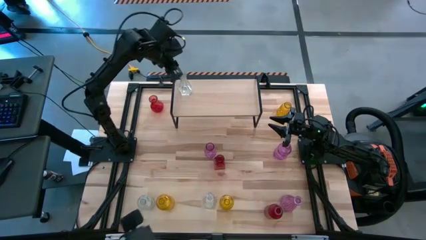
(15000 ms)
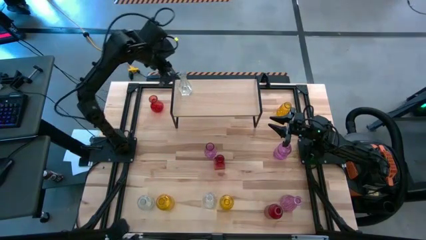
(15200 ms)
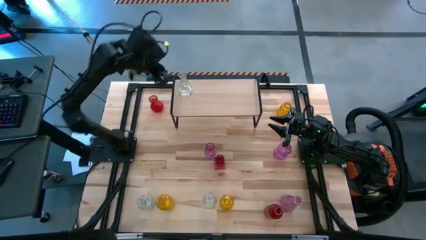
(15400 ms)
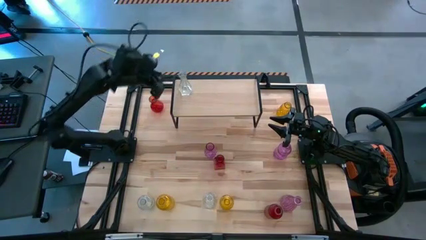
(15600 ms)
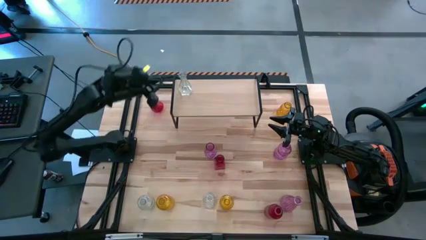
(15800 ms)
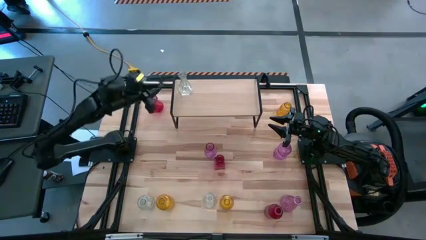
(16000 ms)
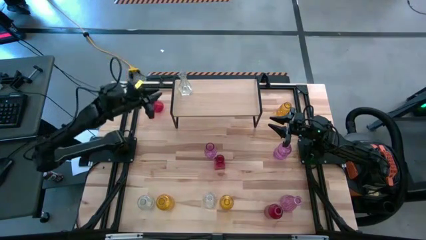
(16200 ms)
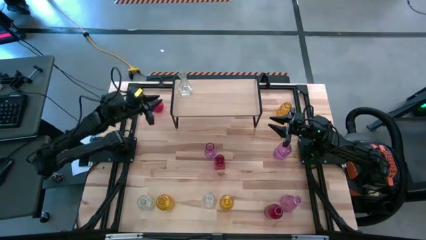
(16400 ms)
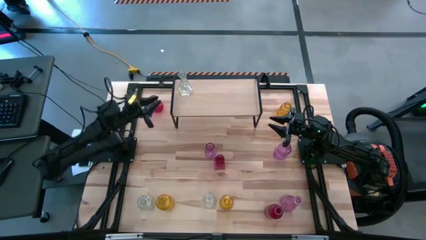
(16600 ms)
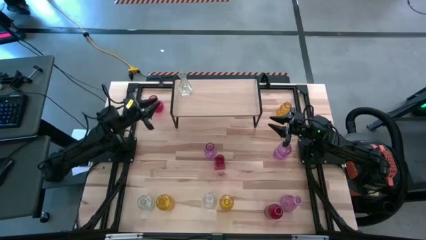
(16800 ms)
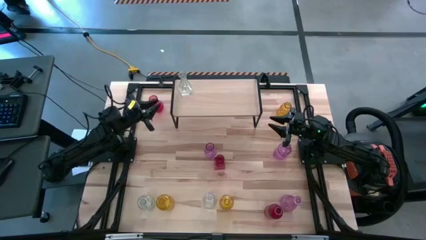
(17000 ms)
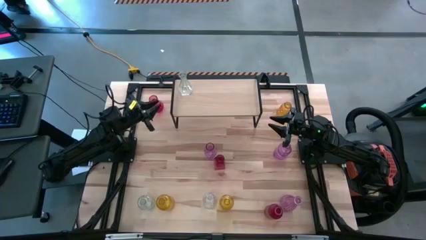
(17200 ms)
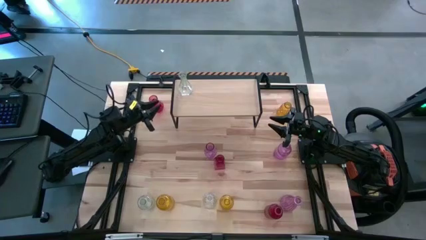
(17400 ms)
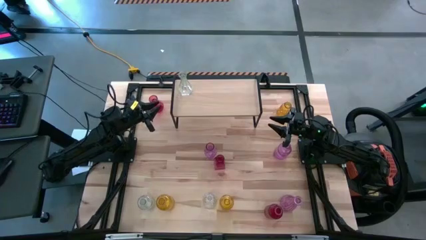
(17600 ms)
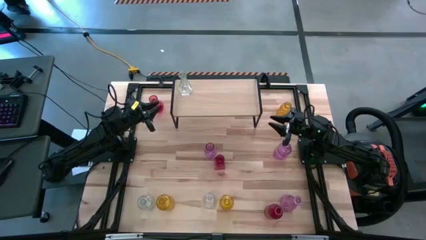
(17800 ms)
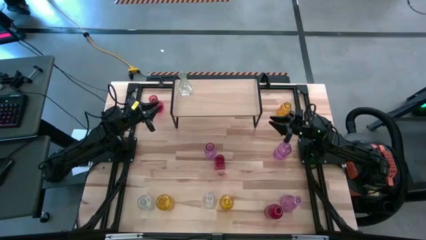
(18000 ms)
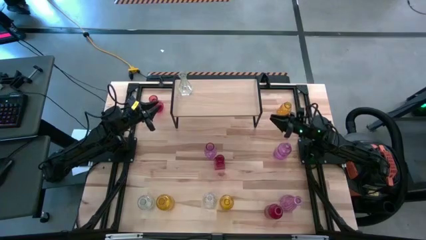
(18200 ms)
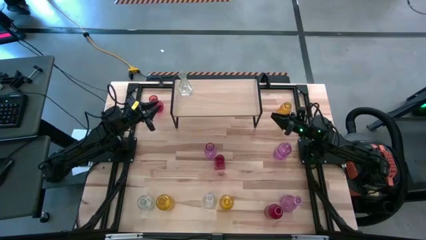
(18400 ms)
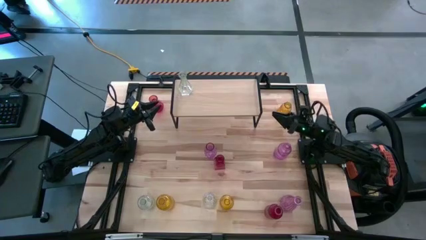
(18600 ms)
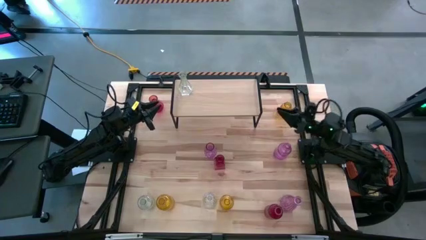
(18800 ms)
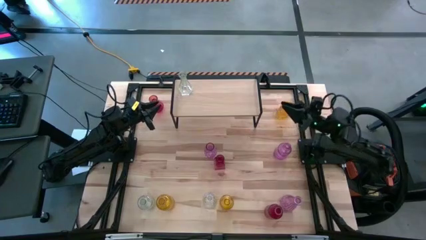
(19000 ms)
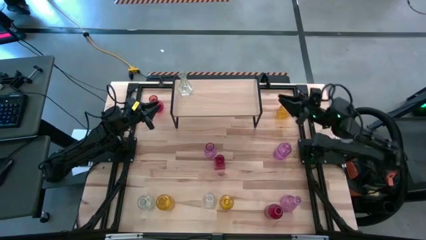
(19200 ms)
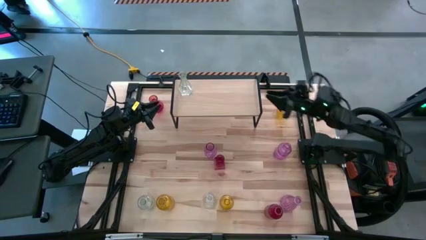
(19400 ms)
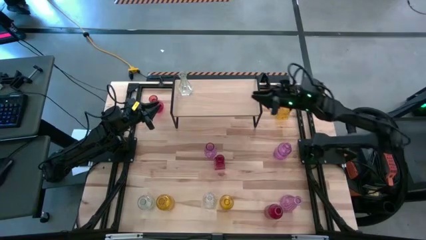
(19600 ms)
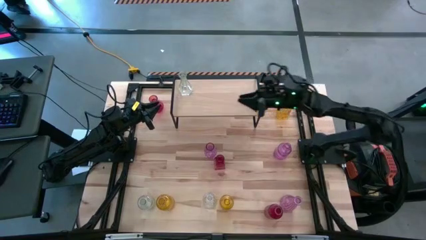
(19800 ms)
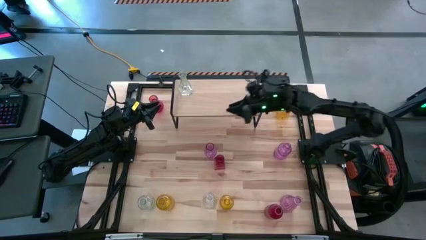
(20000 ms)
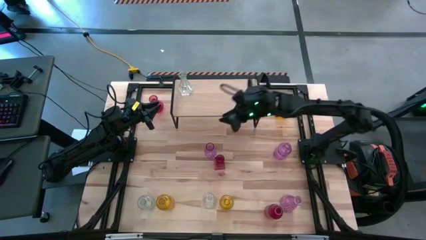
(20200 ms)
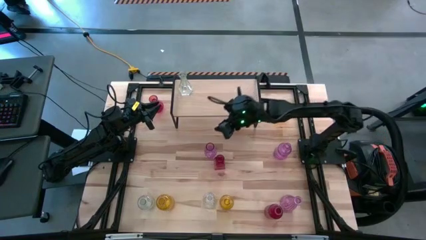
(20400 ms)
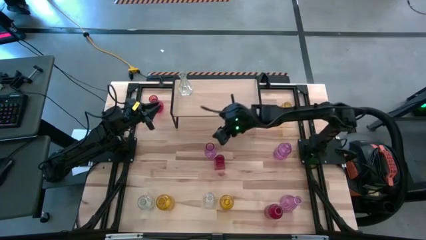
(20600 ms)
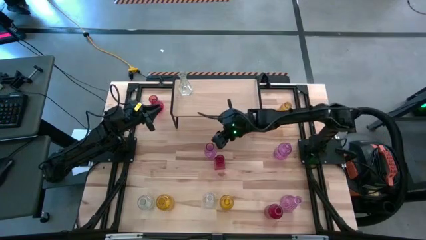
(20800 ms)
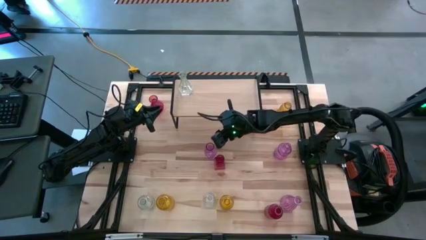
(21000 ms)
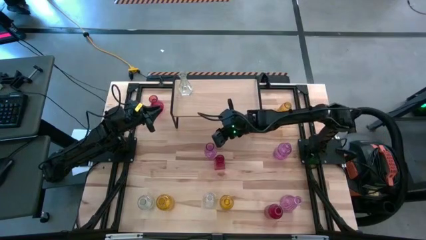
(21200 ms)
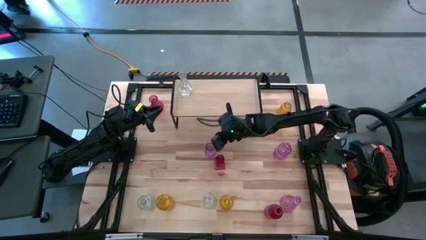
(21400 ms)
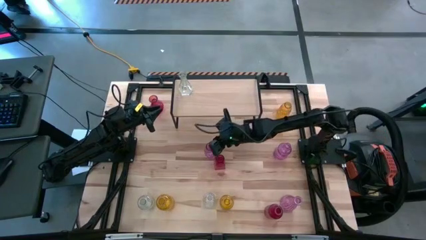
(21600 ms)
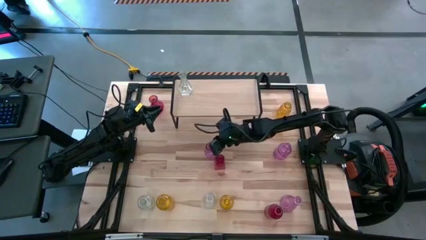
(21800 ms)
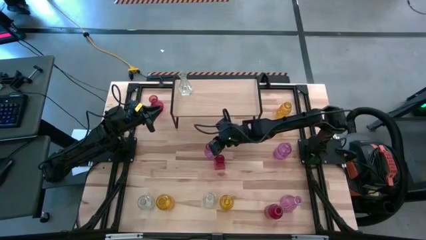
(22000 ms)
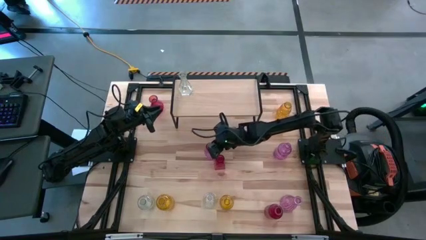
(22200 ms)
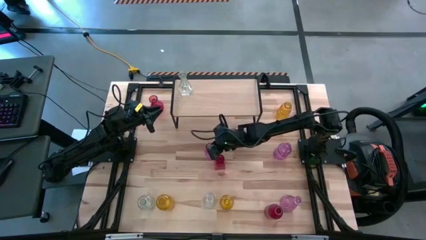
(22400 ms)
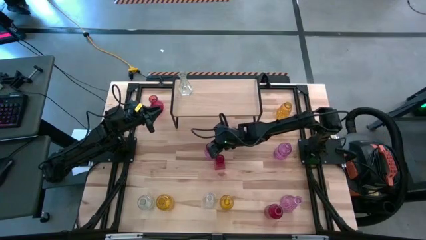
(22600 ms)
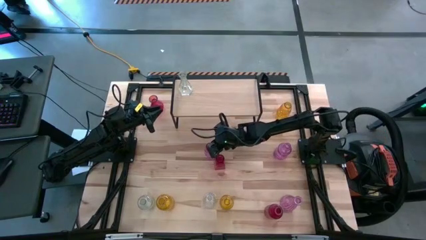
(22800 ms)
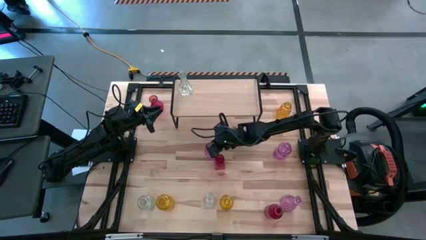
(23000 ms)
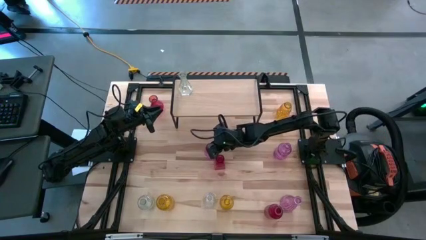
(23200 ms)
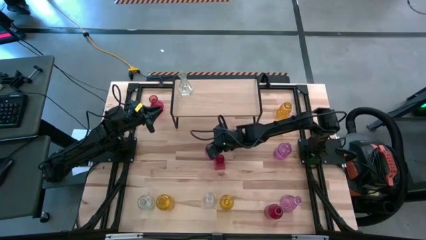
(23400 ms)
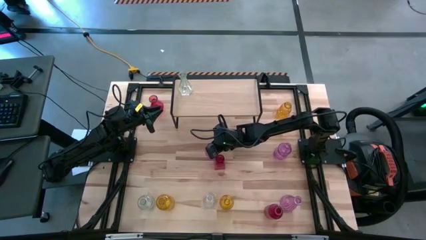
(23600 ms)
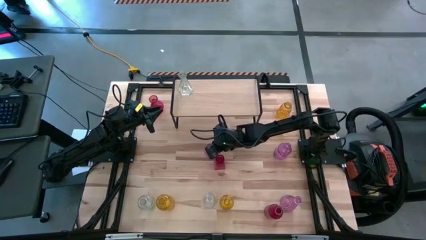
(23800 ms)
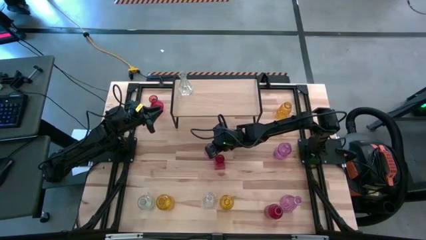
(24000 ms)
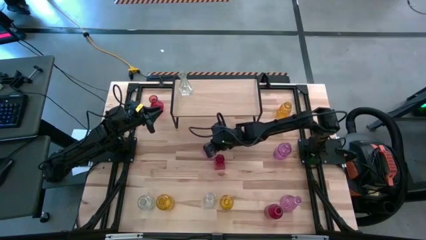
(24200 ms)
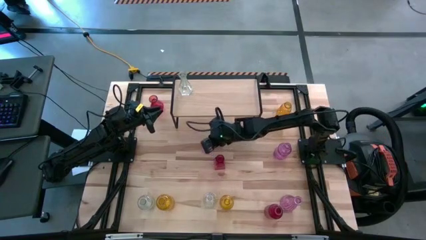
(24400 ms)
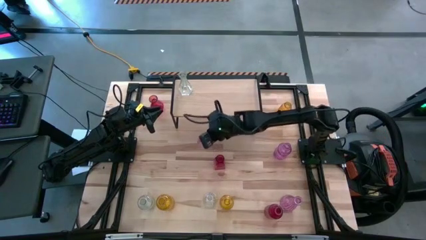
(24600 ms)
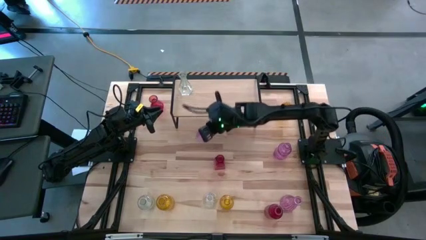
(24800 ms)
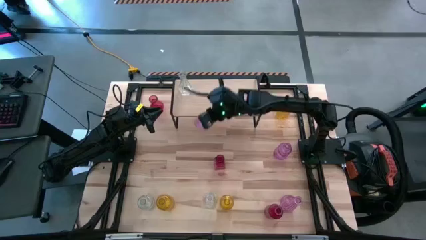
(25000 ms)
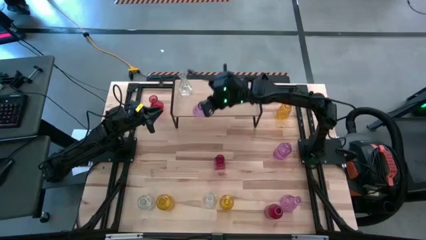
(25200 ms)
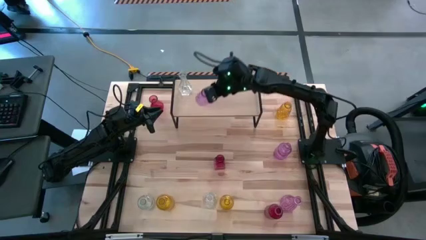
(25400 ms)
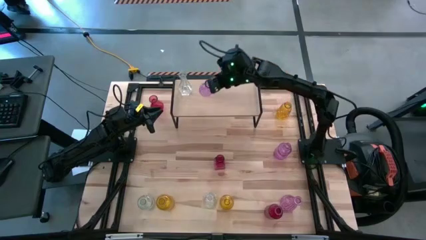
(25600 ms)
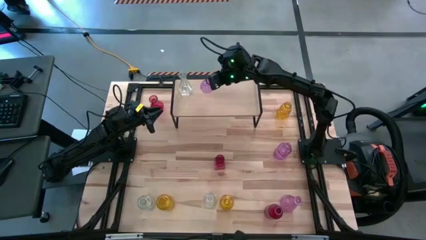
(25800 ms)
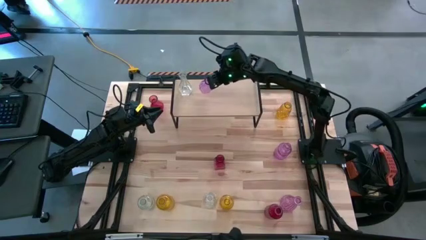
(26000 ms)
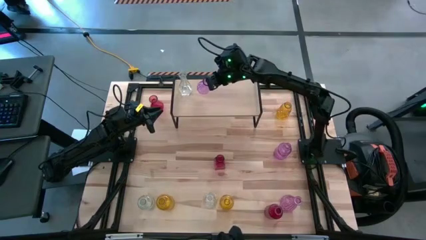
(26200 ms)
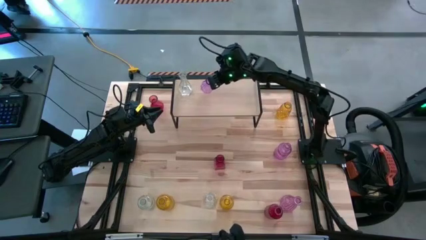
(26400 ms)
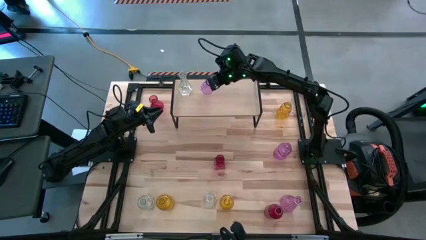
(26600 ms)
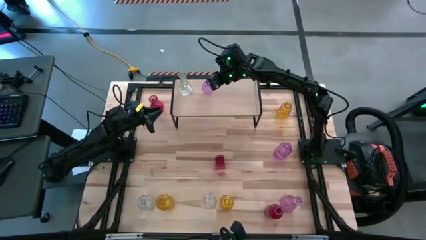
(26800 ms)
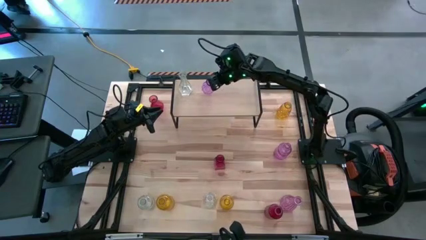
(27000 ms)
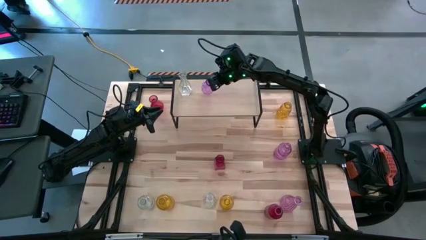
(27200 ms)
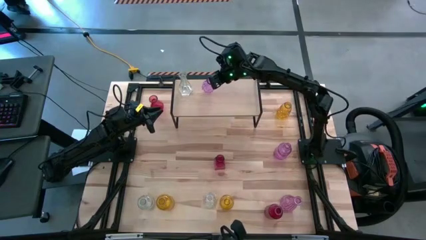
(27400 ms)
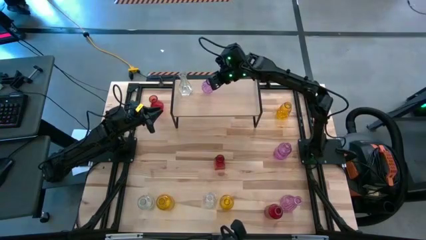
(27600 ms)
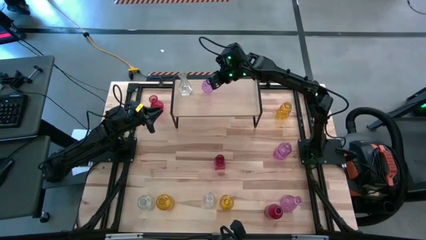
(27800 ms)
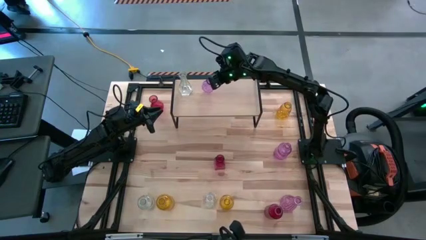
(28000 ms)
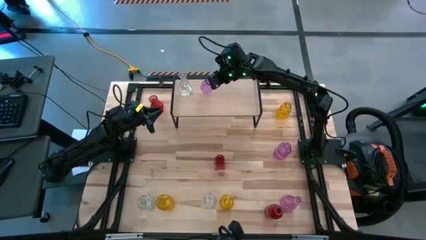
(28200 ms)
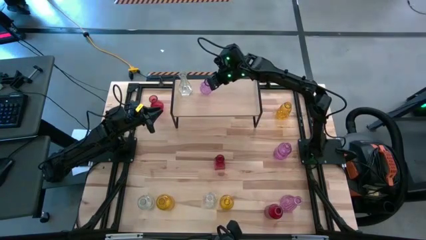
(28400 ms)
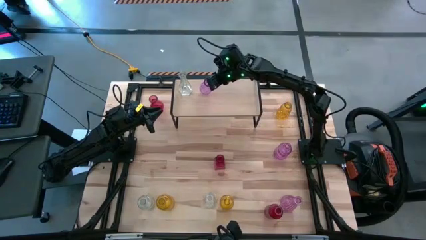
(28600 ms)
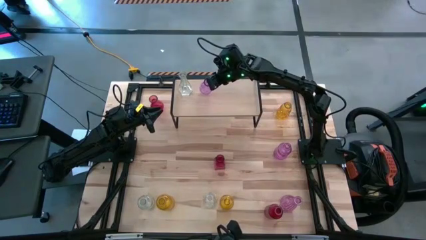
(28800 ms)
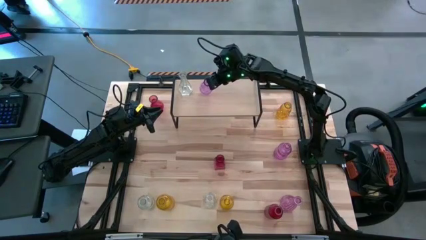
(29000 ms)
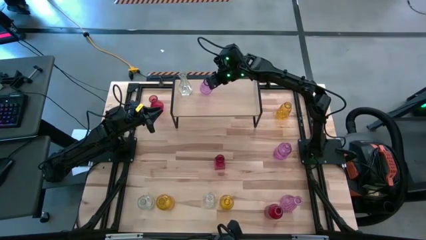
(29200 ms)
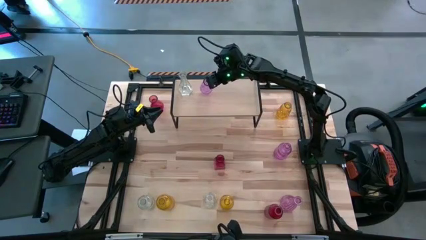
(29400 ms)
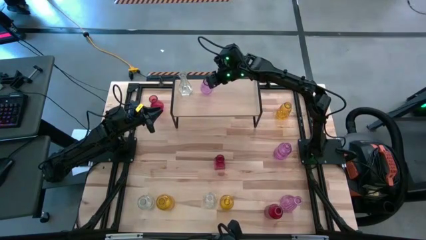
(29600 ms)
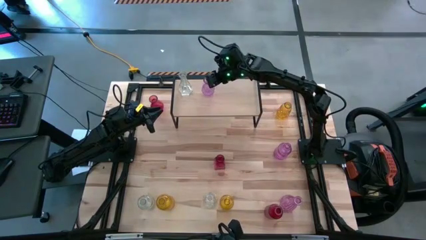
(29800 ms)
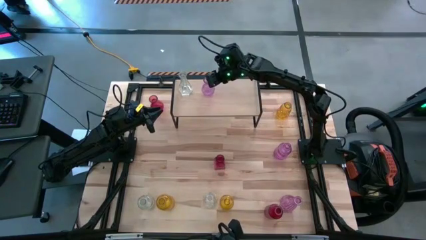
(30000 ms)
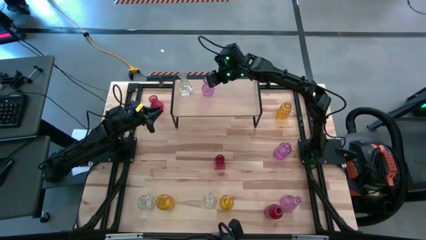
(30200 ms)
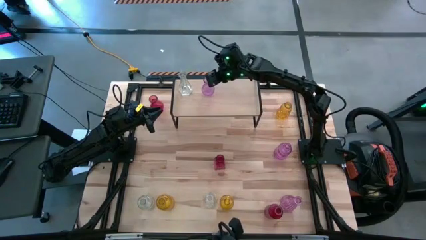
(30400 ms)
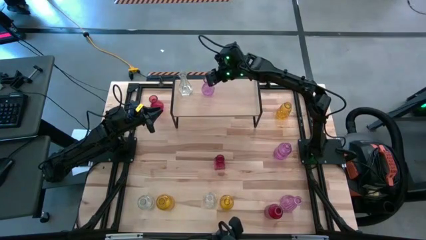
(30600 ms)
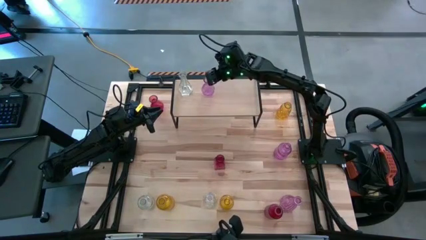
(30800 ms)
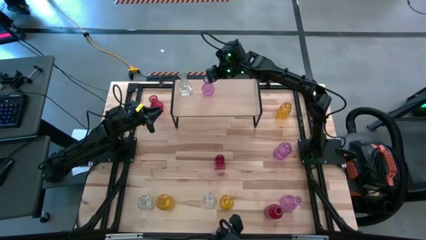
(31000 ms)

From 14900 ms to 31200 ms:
Task: sort vases onto shelf
Put the top left purple vase on the shelf

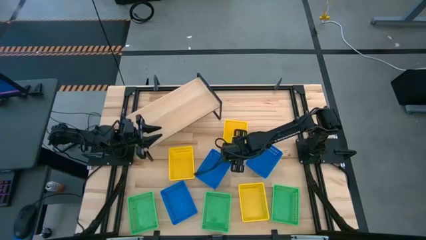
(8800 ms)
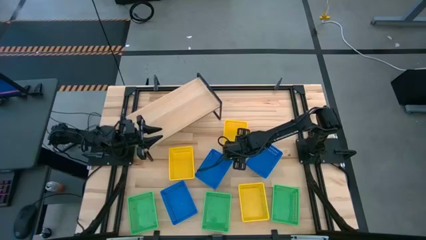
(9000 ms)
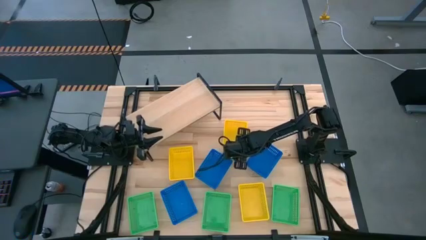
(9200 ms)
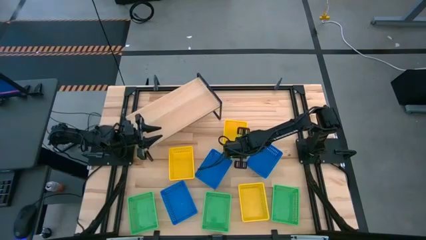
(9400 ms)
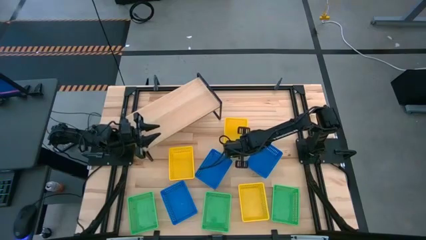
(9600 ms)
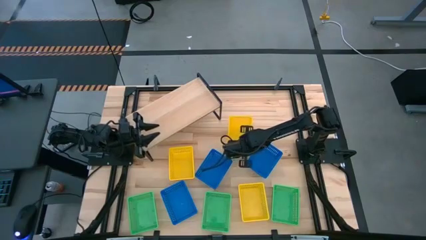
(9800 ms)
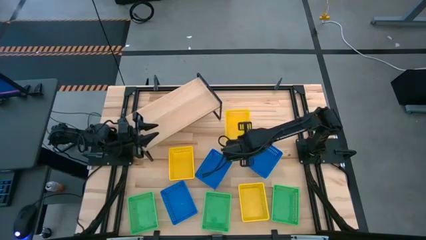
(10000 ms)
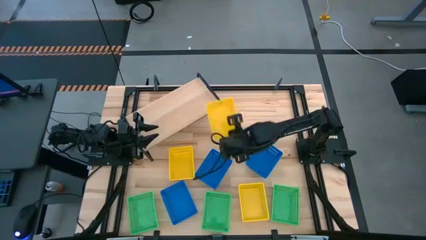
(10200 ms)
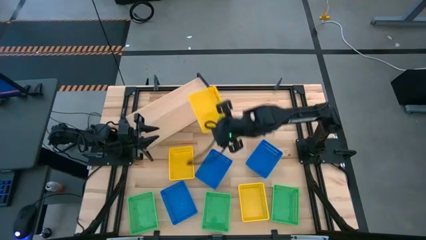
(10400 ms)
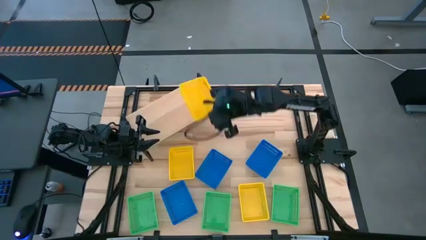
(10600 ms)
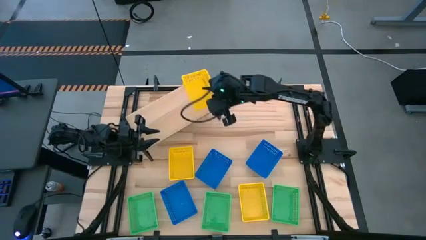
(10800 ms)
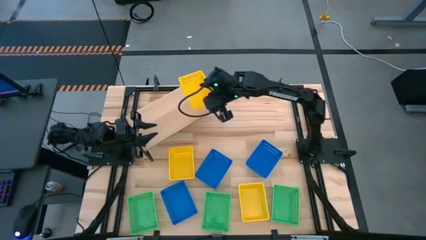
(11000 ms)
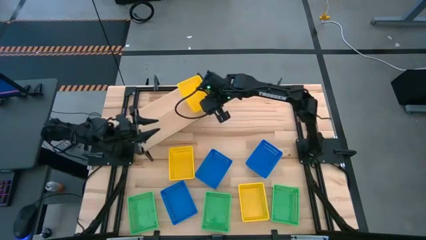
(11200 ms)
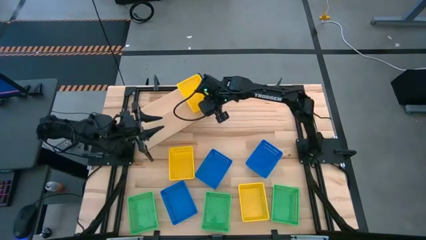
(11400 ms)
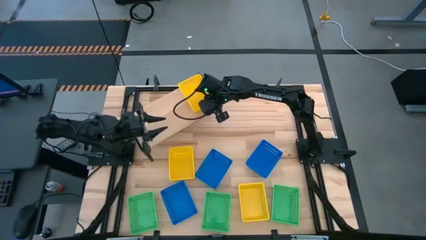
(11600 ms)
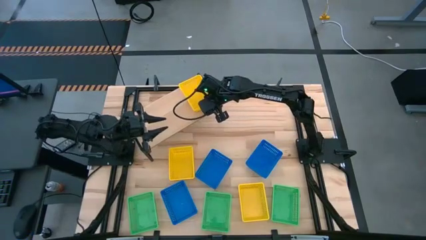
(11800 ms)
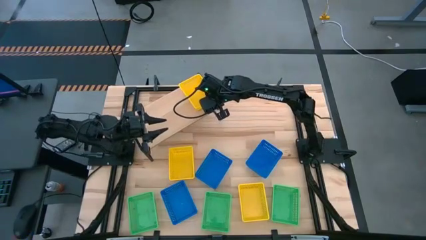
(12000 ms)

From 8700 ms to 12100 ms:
Task: Stack baskets on shelf by color
Put the top right yellow basket on the shelf
